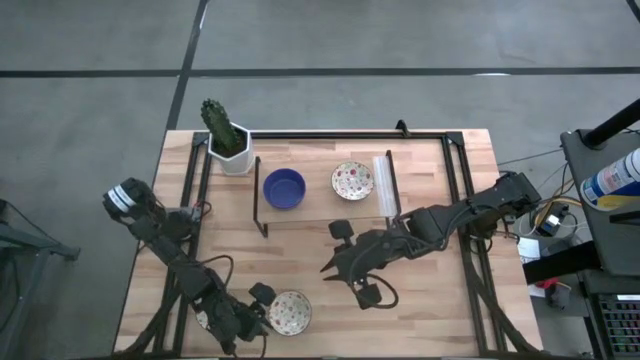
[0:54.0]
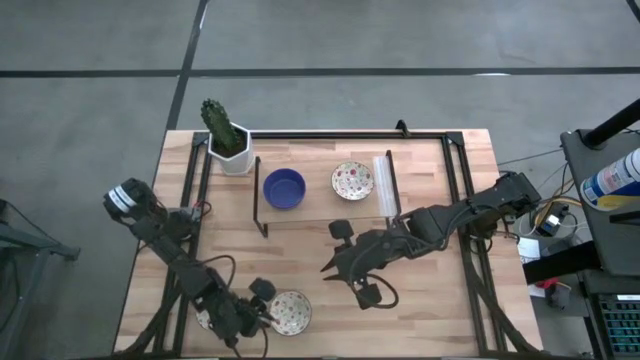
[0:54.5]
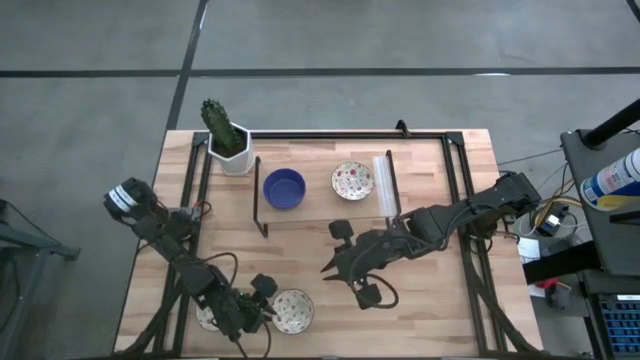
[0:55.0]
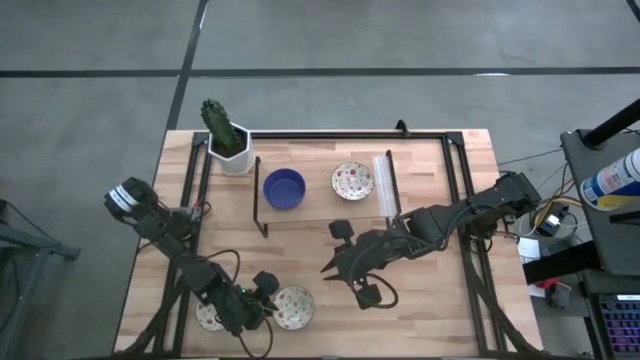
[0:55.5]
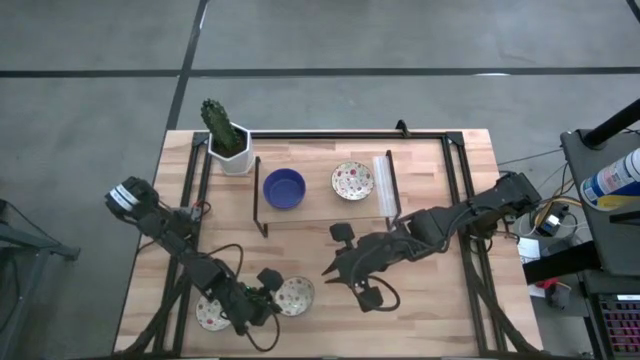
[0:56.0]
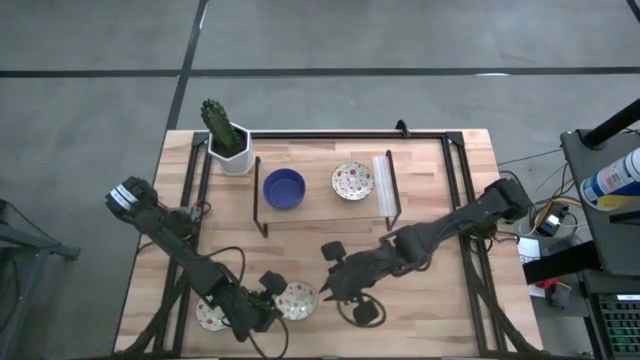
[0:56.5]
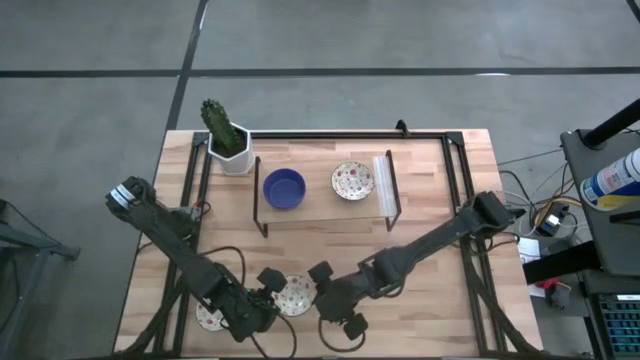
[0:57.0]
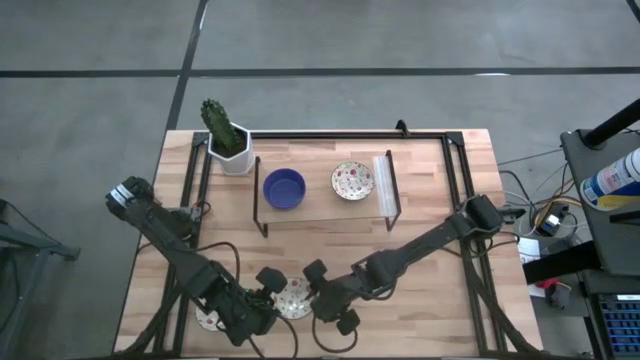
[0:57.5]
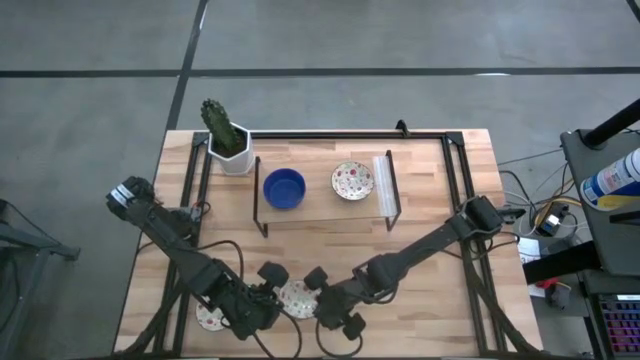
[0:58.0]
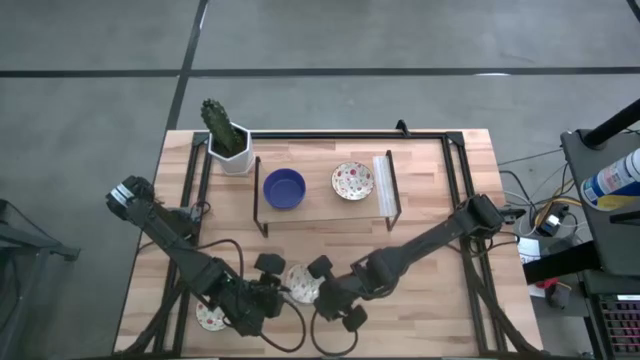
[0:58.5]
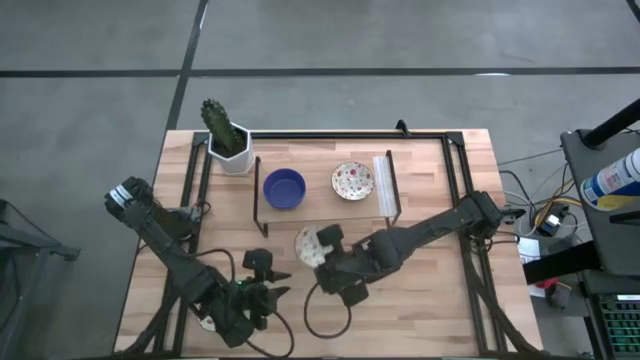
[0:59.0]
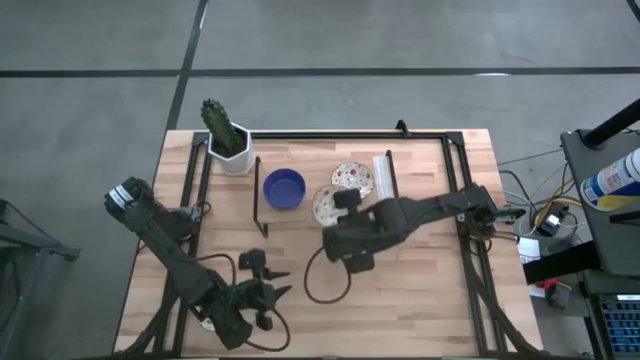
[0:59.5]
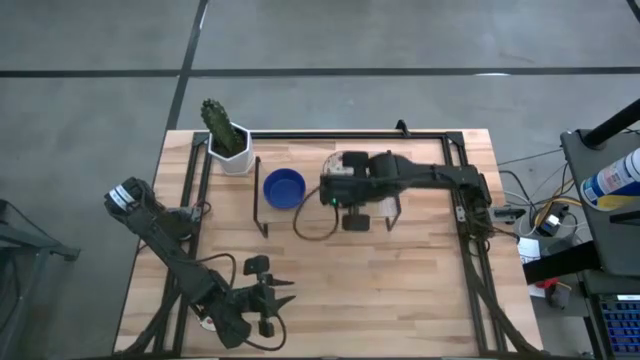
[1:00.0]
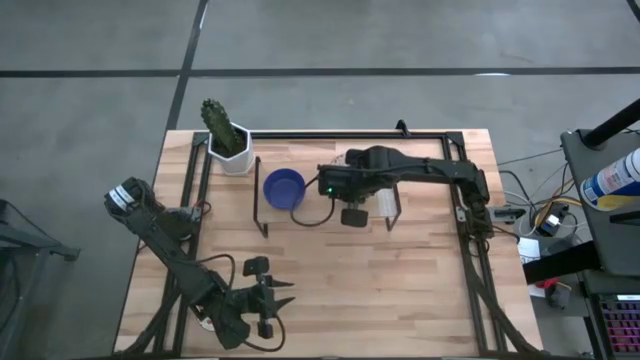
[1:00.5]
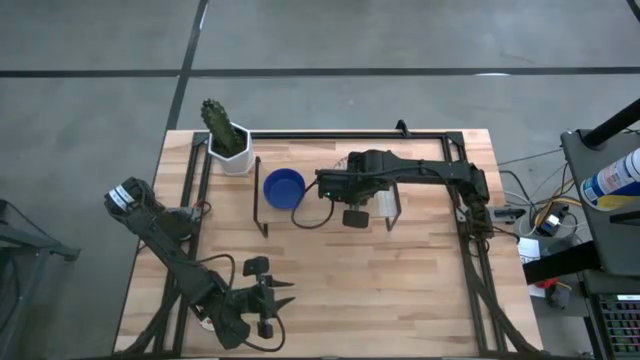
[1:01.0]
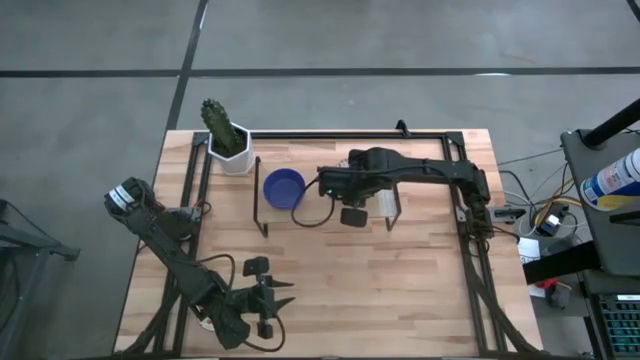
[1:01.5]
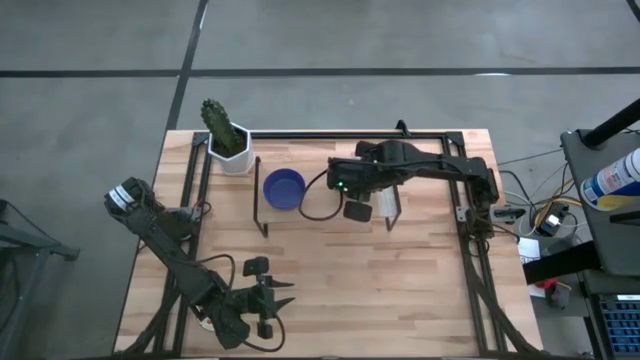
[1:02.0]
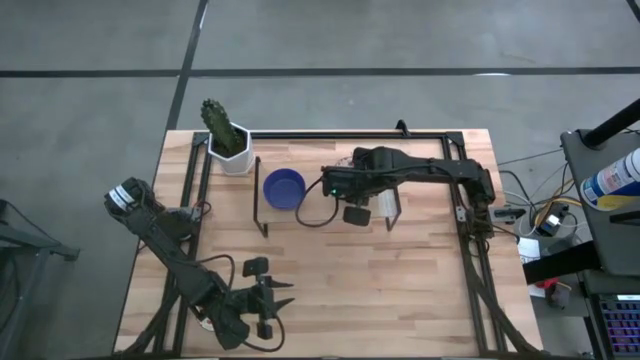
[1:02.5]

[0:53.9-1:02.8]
Task: Pick & Place Mini bowls
Stack the right white patterned bowl on the white patterned bowl on the shelf

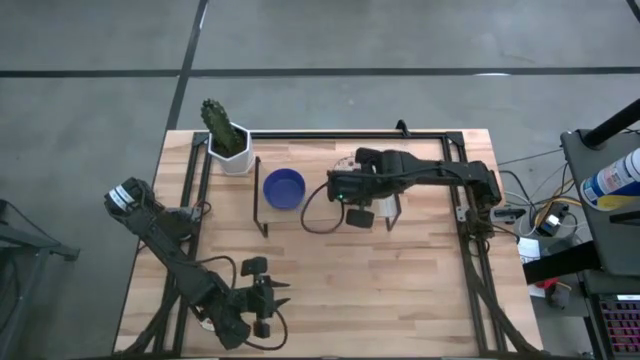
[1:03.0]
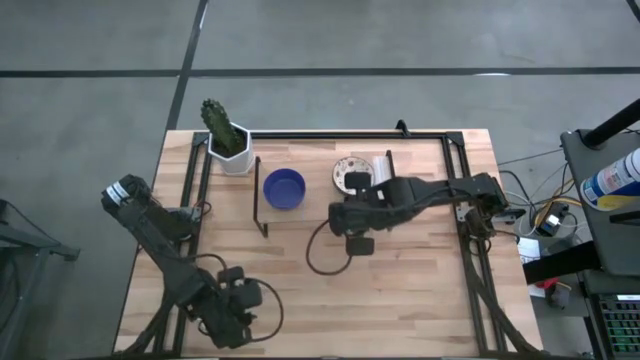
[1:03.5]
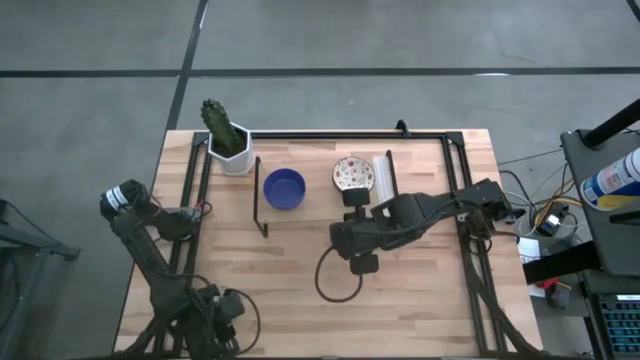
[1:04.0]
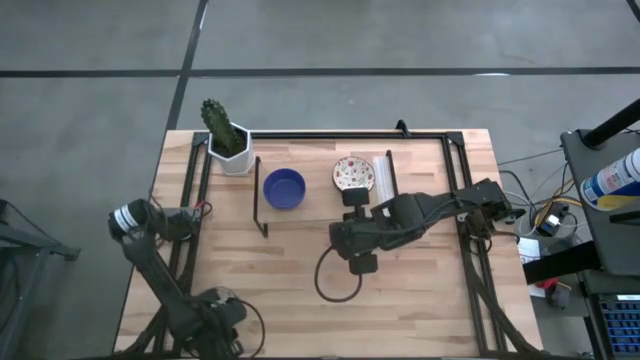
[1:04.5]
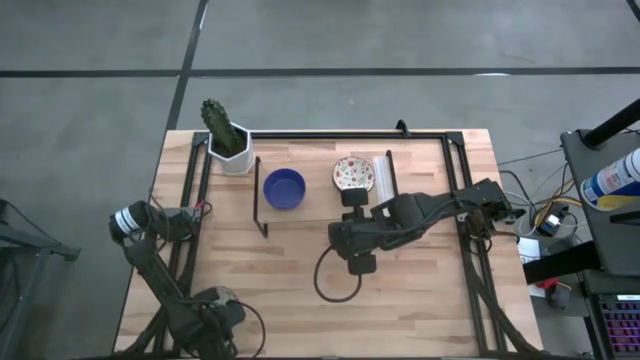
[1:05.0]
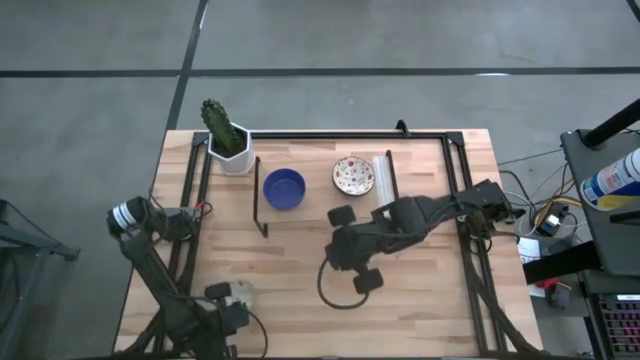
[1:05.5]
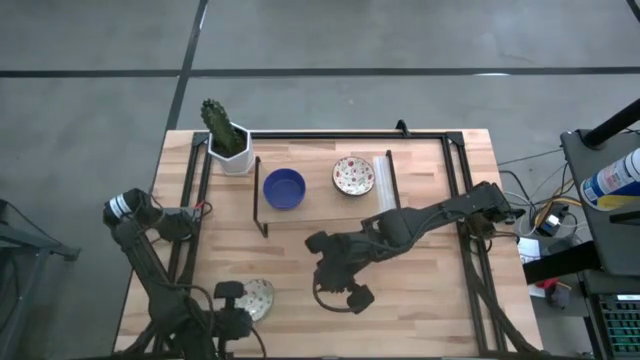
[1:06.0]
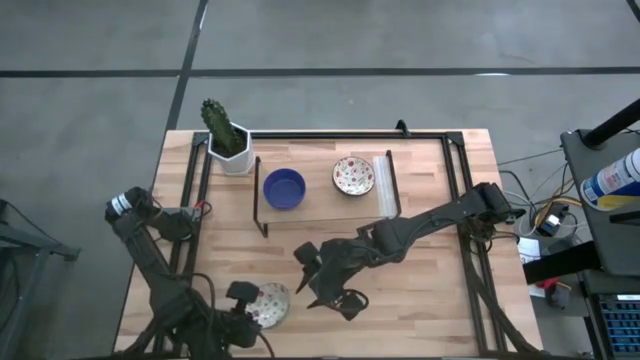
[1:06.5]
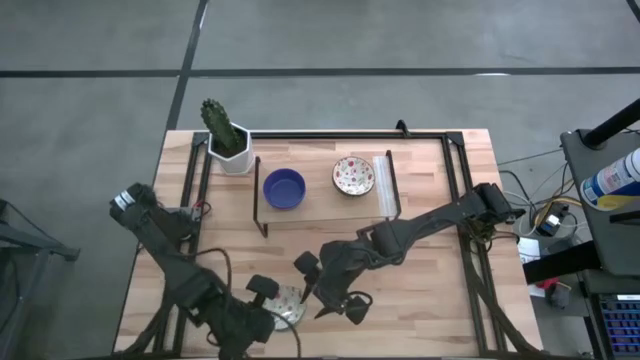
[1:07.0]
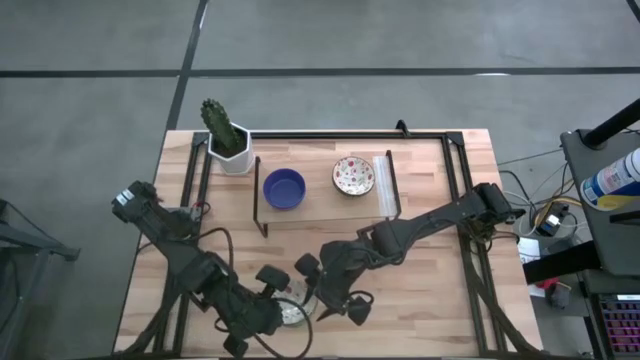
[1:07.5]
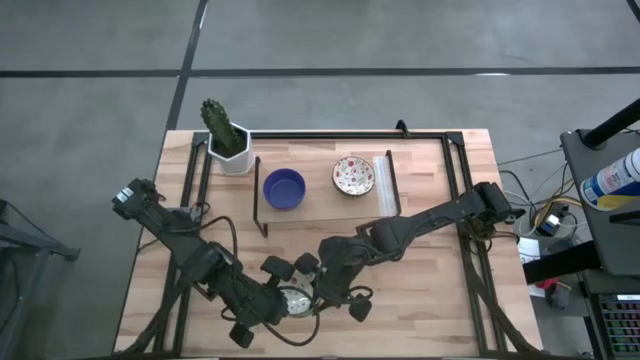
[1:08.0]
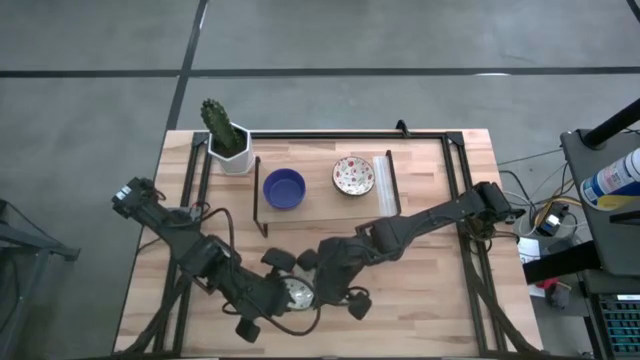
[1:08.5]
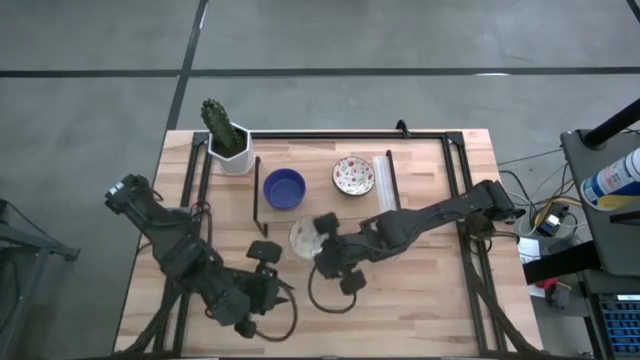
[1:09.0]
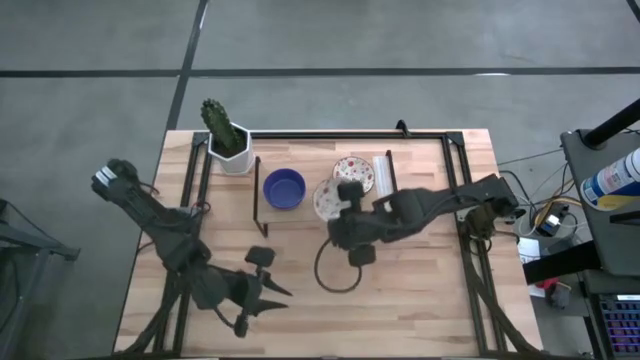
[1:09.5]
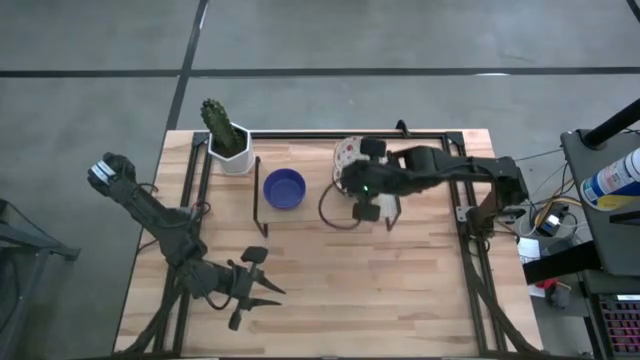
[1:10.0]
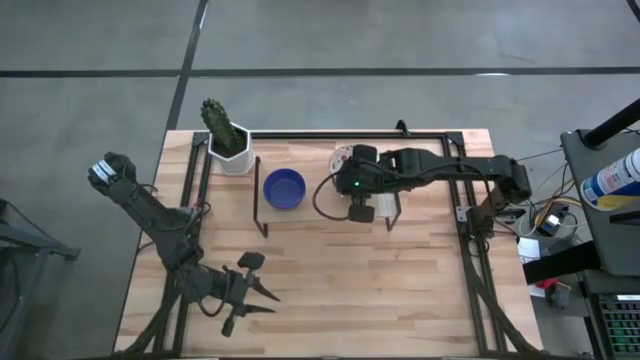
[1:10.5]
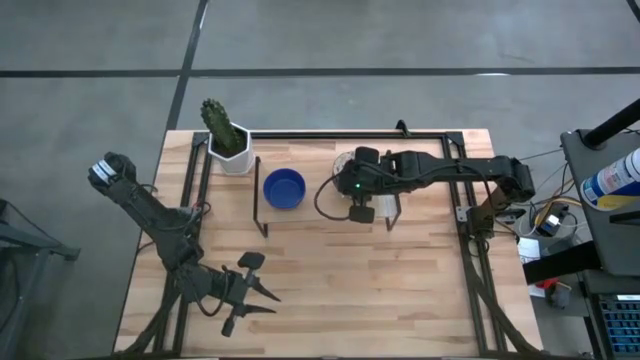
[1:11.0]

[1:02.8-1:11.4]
Stack the white patterned bowl on the white patterned bowls on the shelf

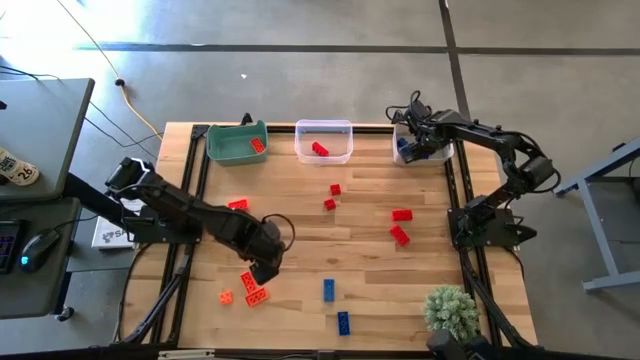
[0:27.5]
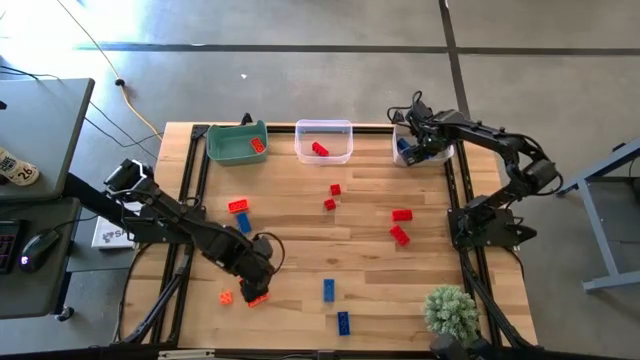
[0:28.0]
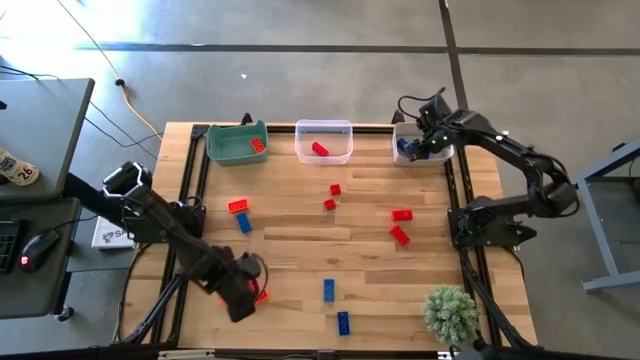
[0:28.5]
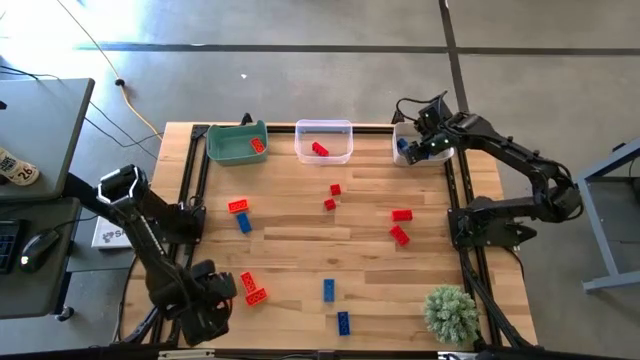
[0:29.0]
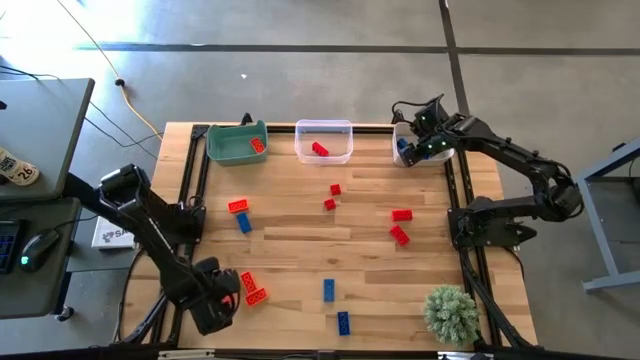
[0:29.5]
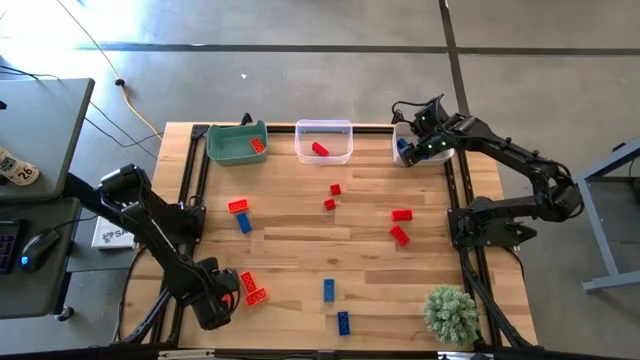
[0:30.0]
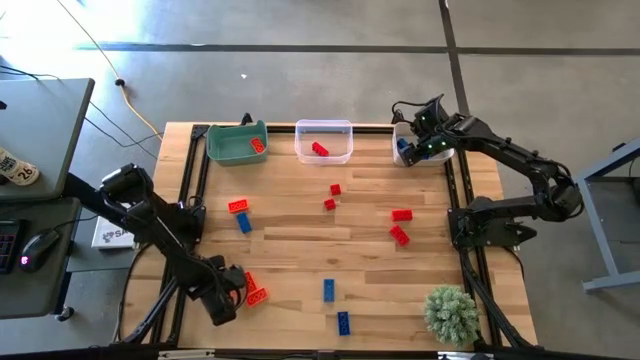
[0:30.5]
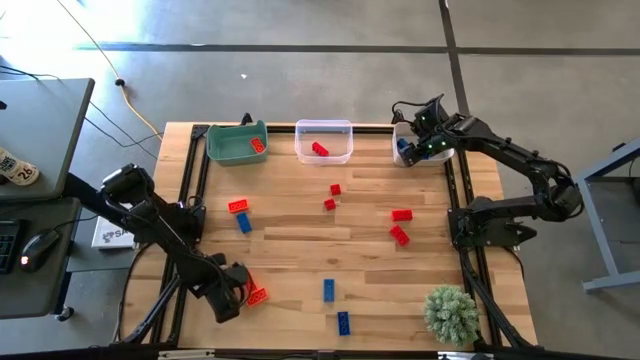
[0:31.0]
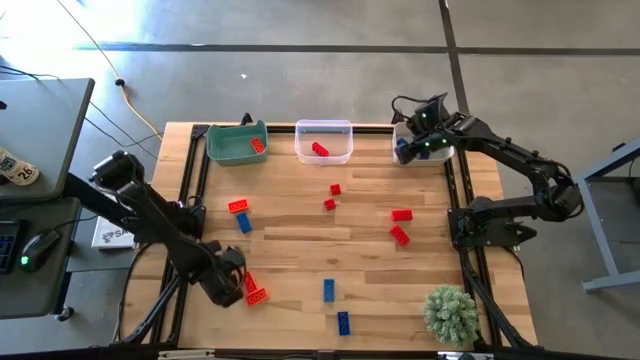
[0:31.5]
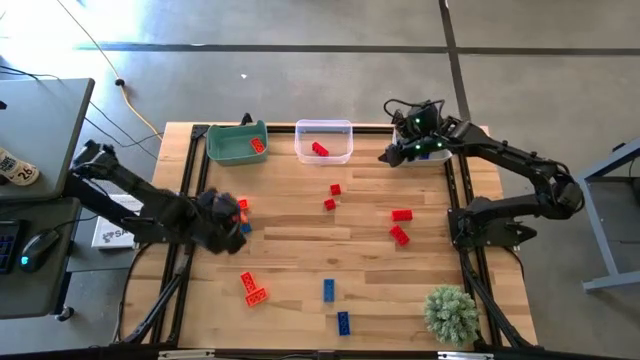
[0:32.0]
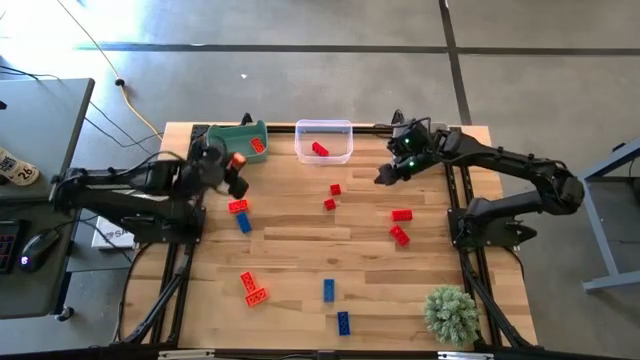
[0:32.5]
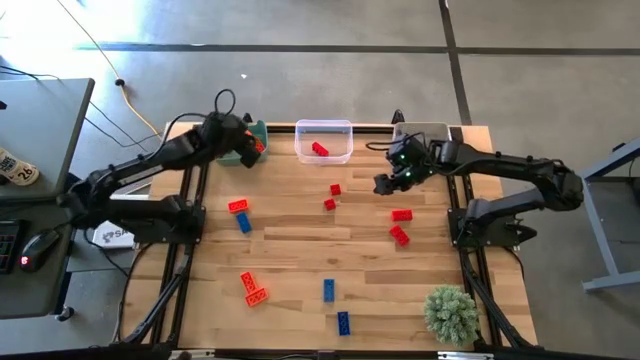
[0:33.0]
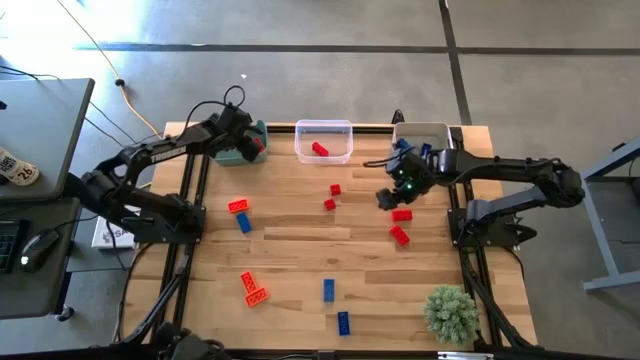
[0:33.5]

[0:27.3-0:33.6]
Task: Sort & place blocks by color
Put the orange game piece into the green bin
